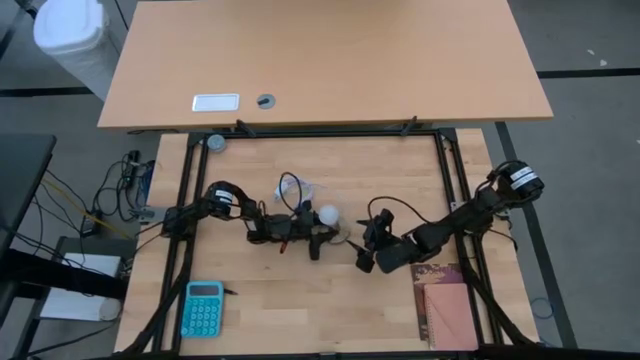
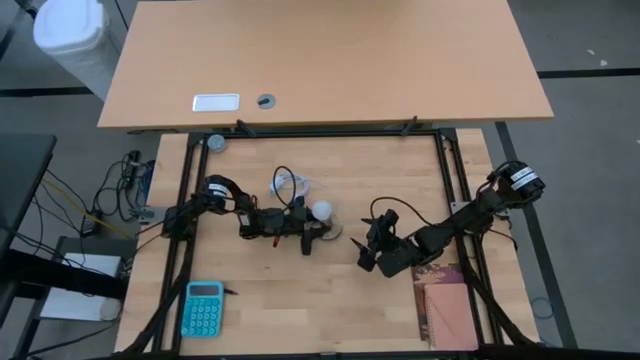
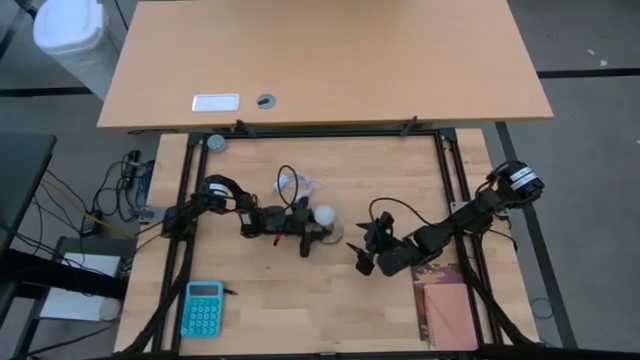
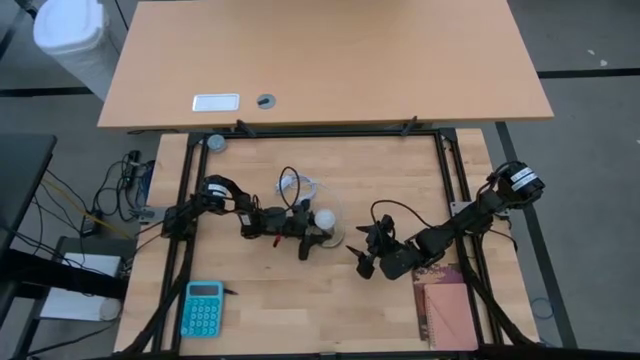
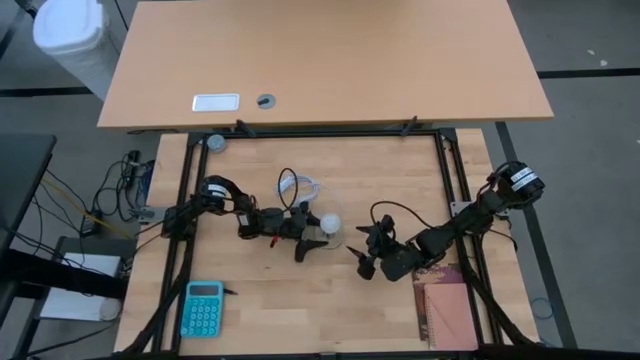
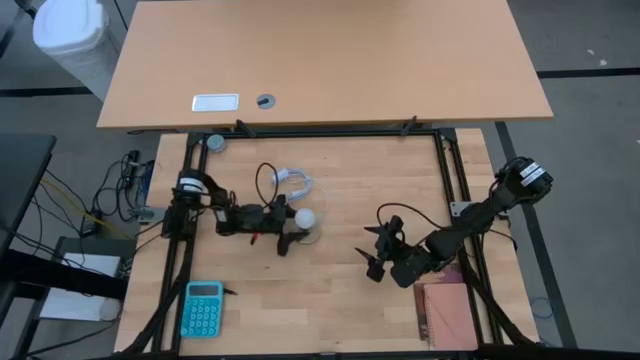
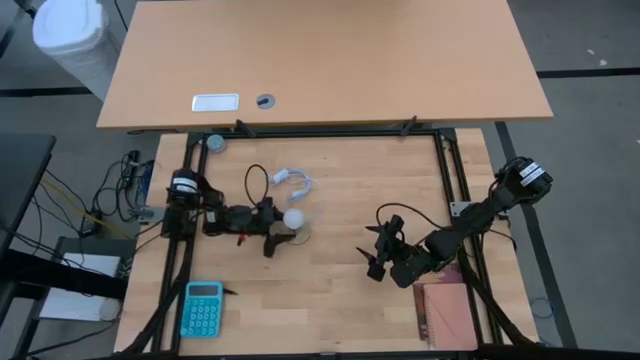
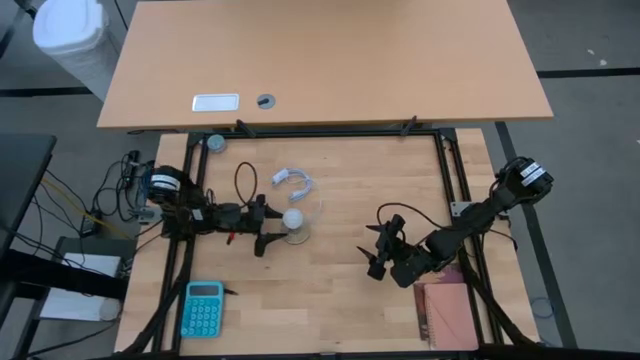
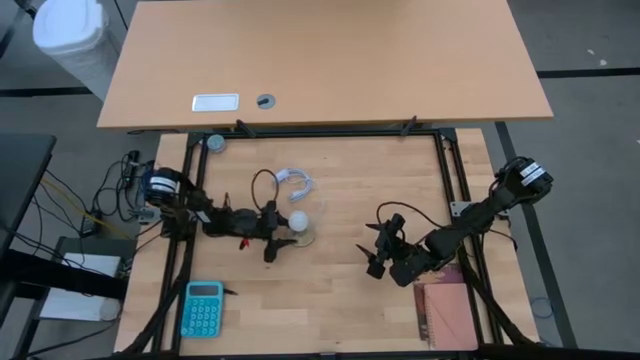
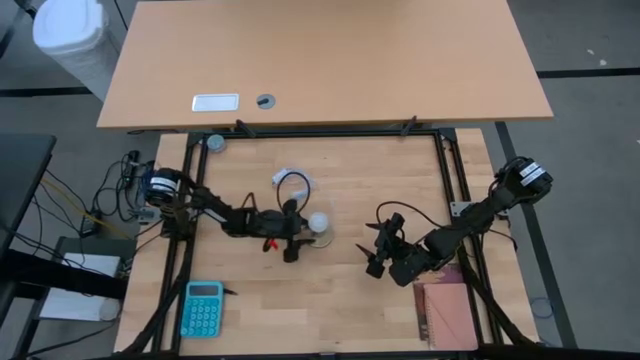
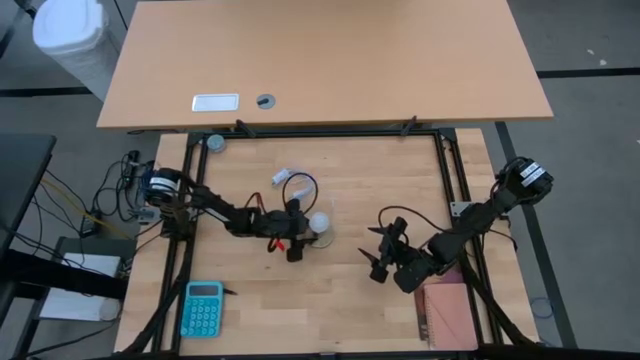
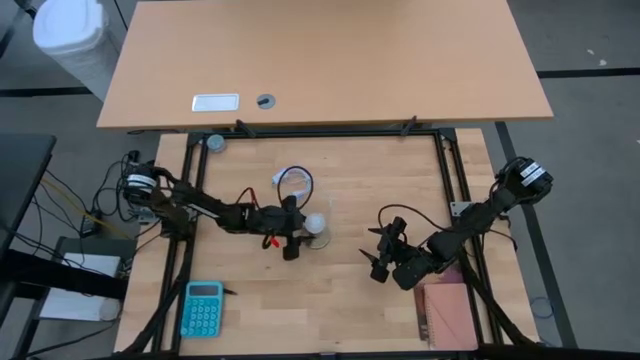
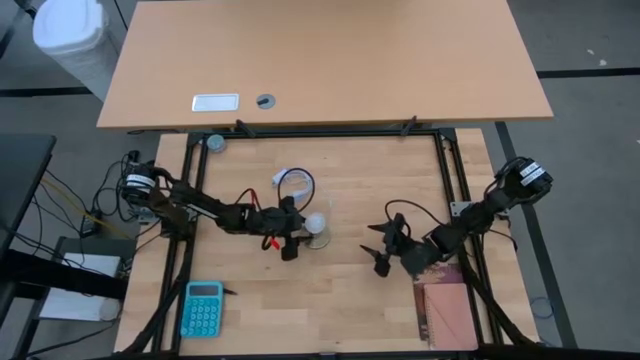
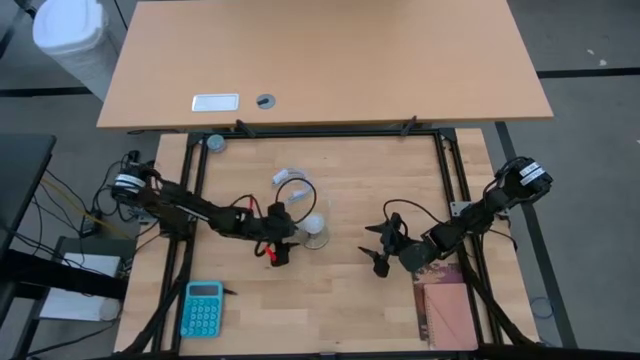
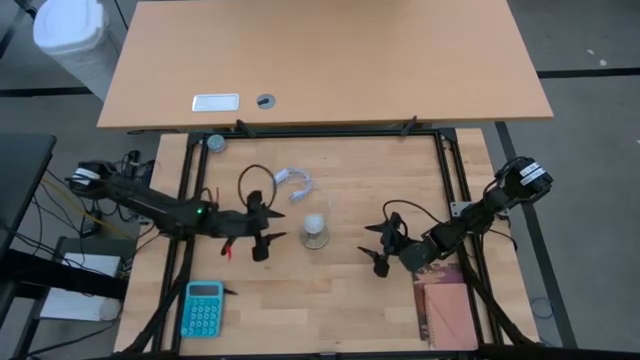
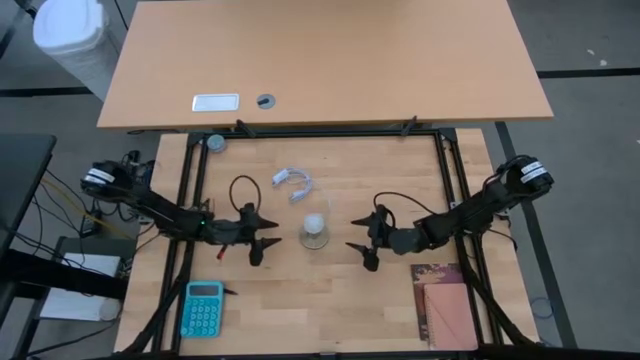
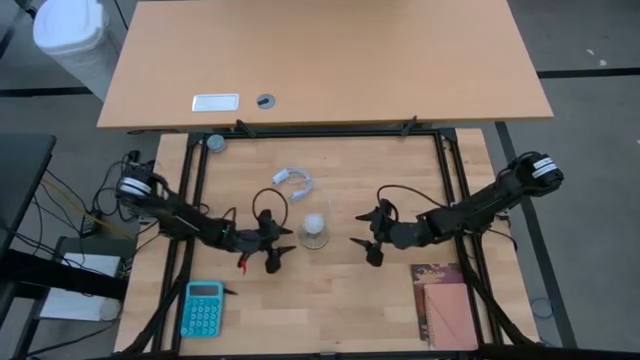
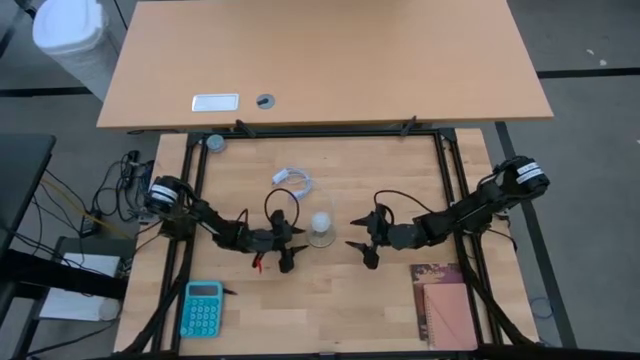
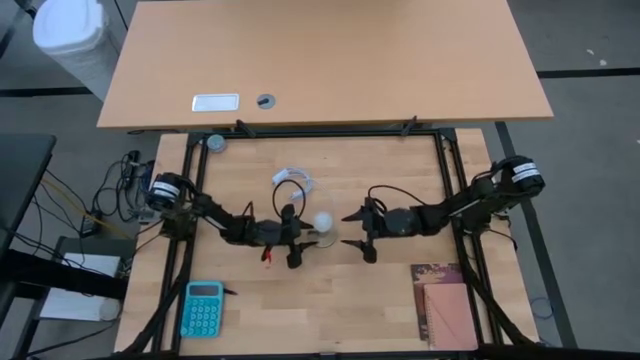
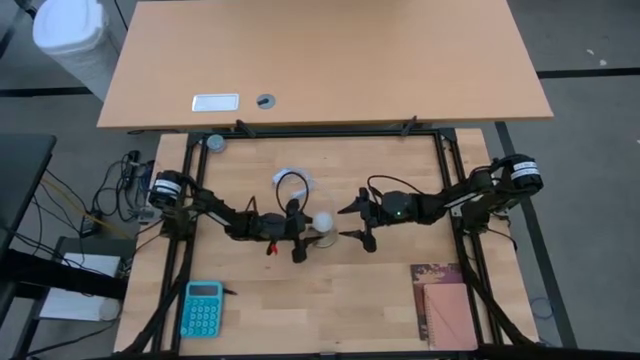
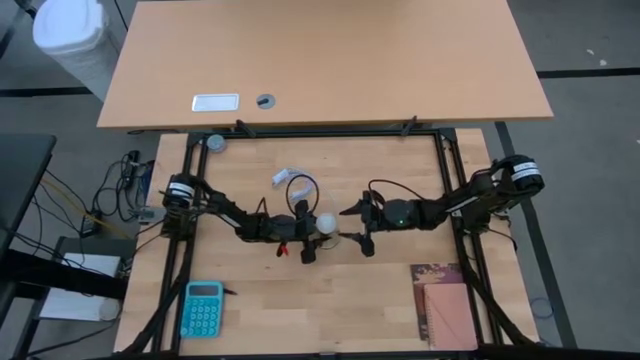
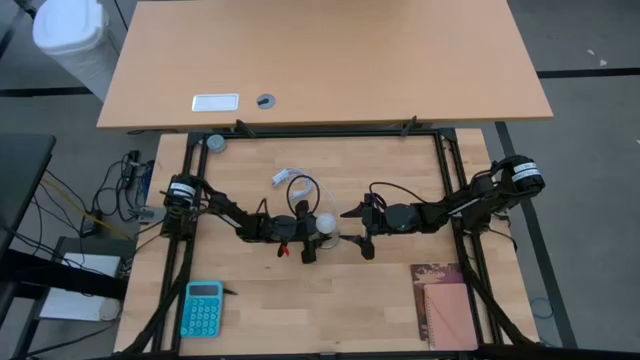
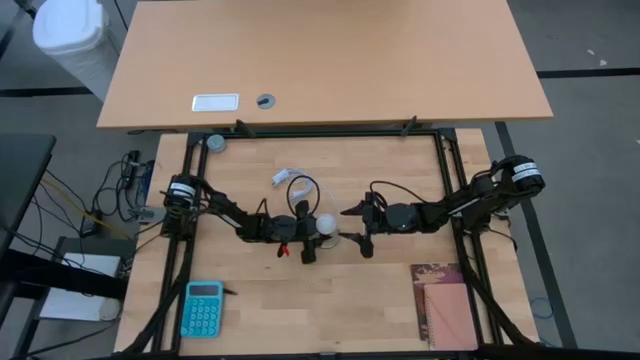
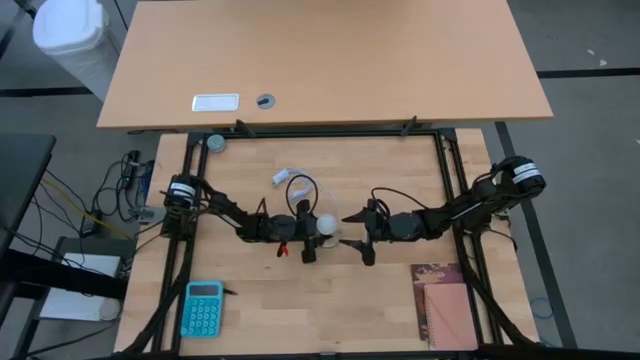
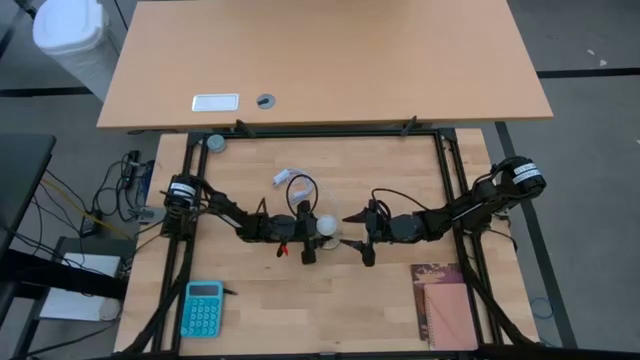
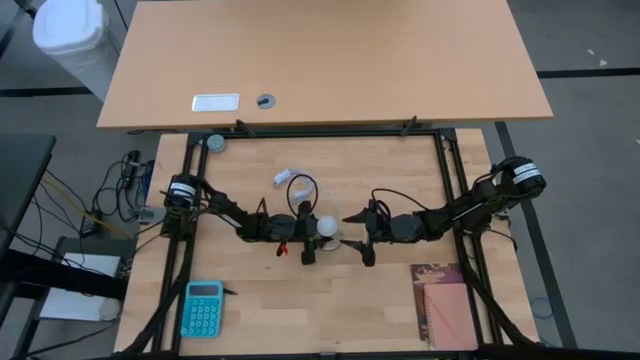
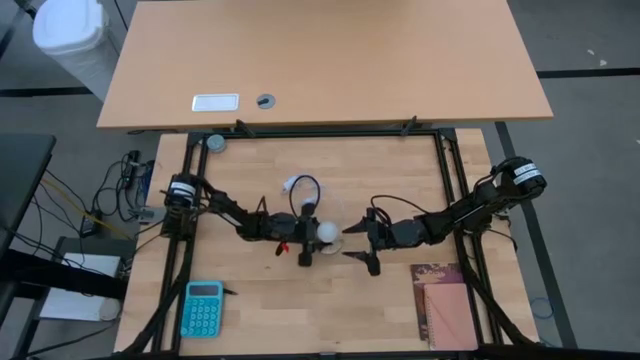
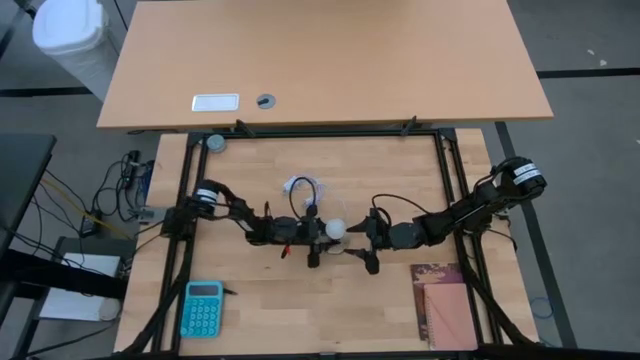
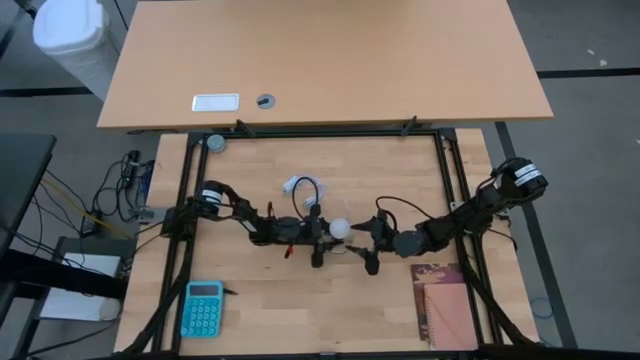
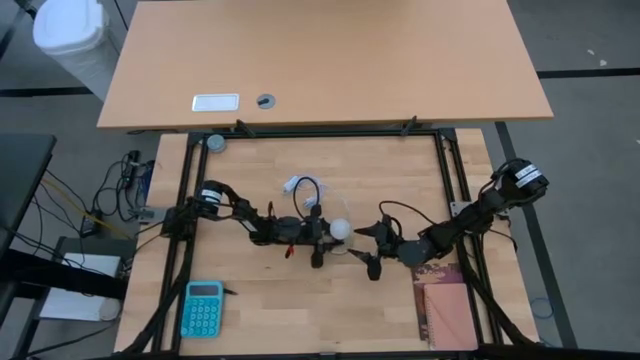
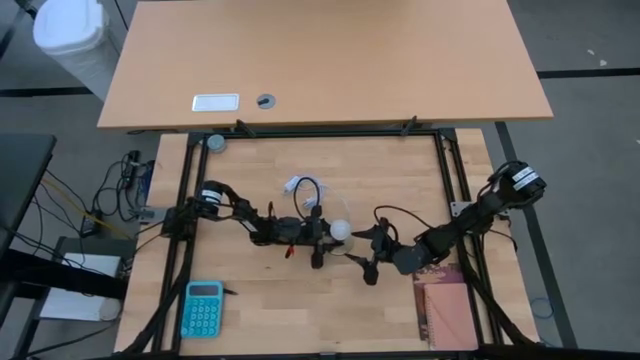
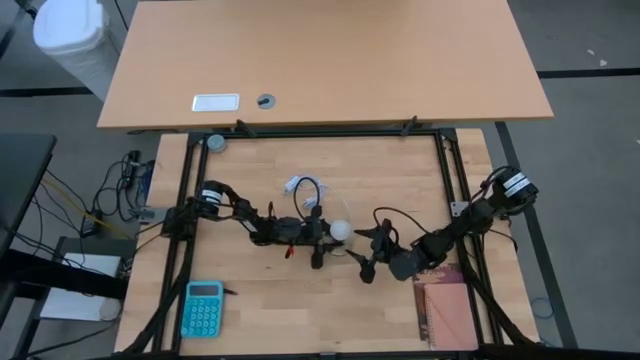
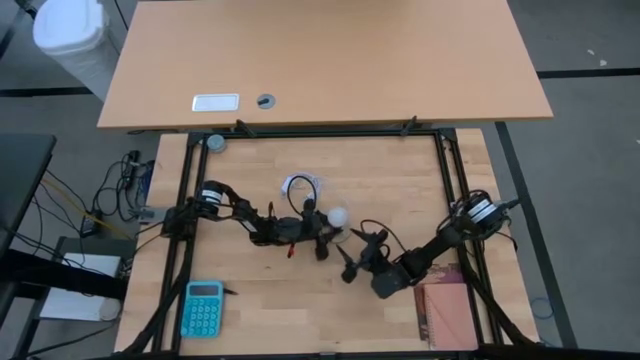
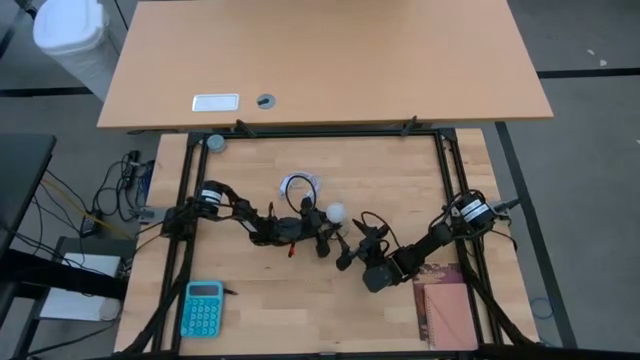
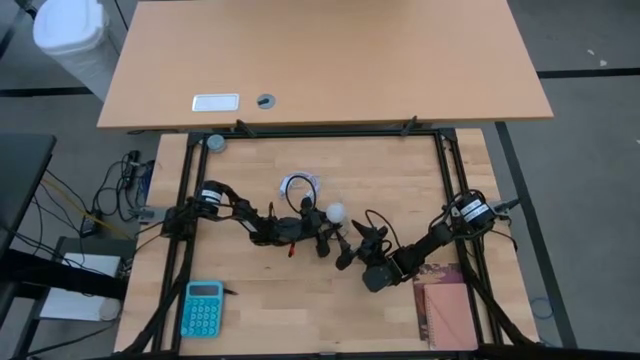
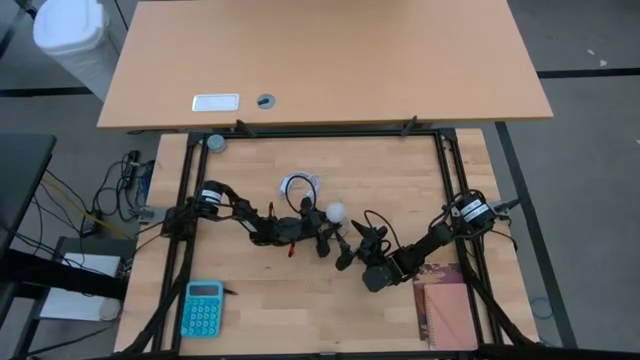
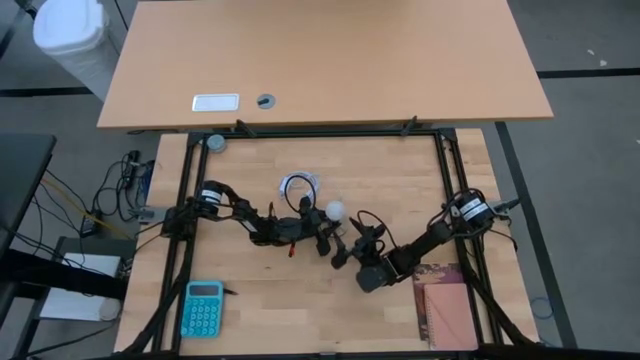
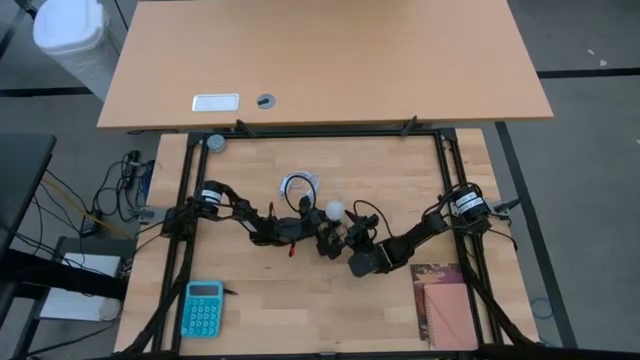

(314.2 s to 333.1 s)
Task: Screw lightbulb
Remove the white lightbulb from the lamp socket
